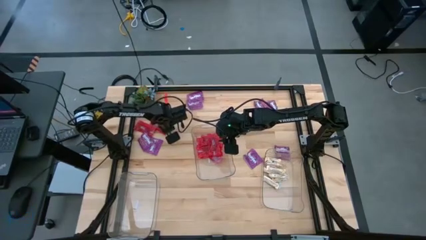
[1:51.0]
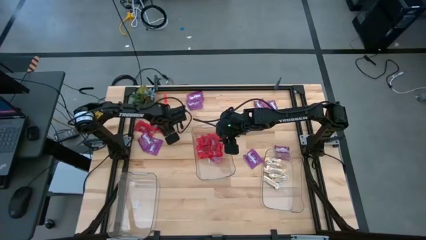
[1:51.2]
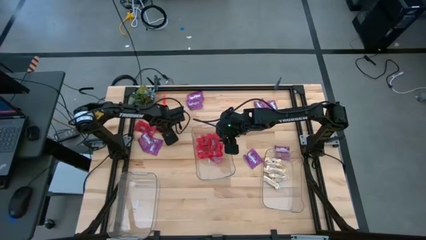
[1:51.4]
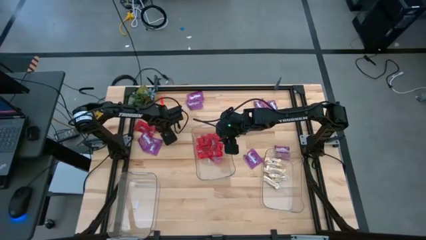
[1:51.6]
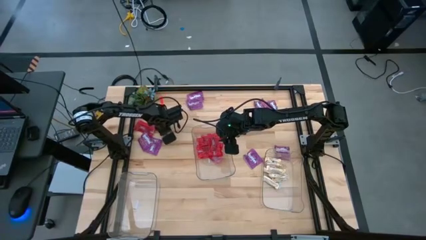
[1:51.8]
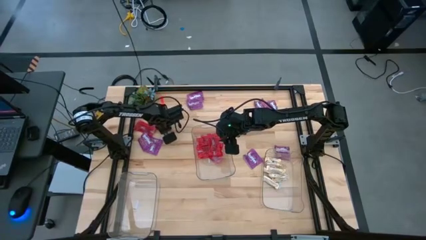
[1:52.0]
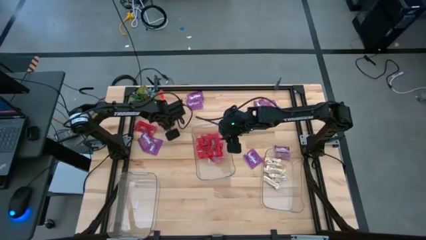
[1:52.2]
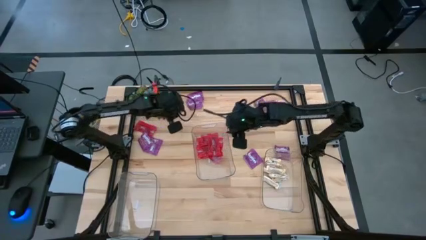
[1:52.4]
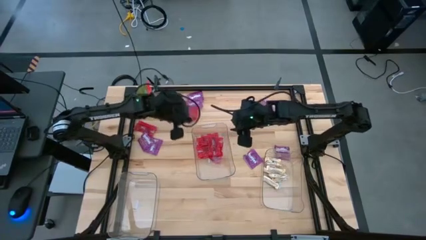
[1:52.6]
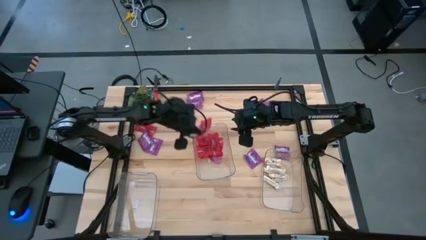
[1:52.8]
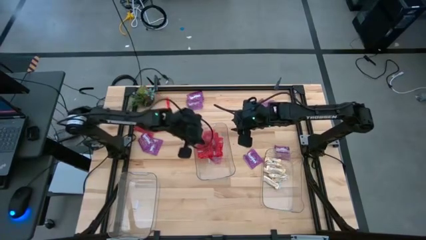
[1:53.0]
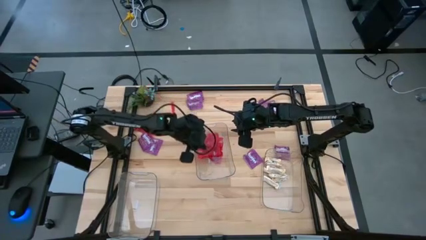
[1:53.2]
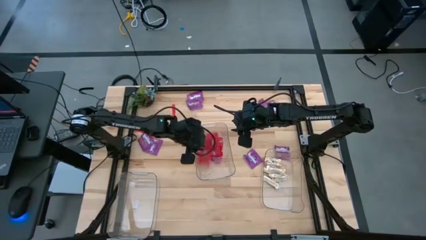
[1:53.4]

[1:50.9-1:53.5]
Task: Sort candy
Put the red candy pack into the middle transparent bin

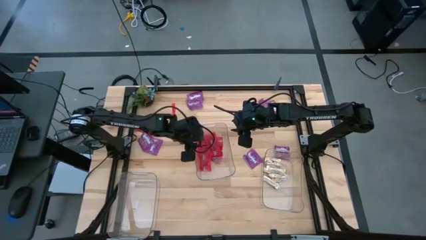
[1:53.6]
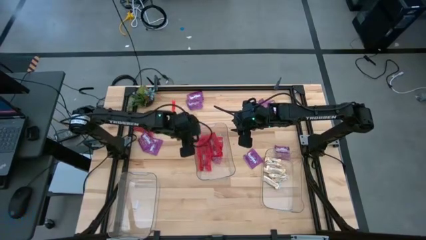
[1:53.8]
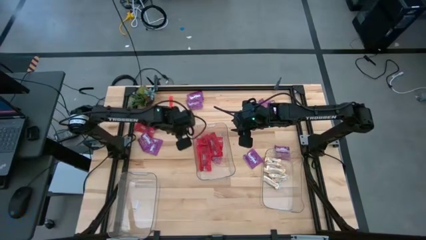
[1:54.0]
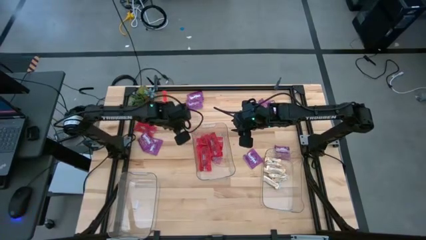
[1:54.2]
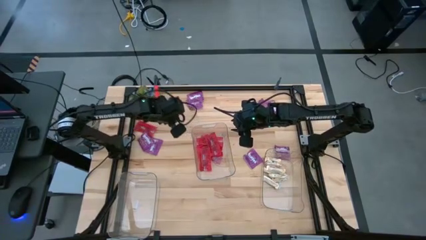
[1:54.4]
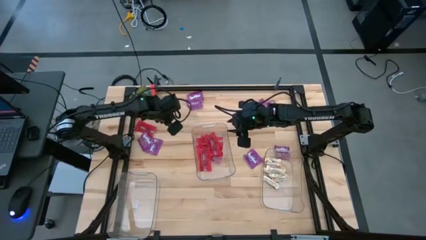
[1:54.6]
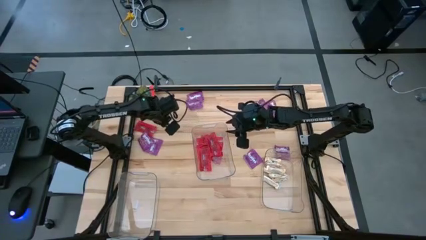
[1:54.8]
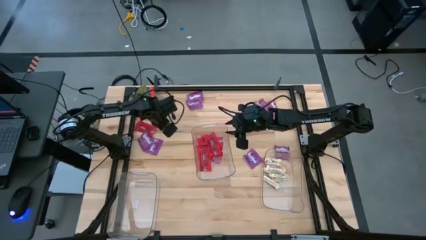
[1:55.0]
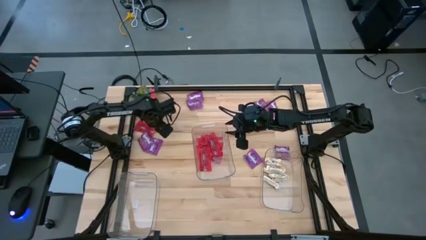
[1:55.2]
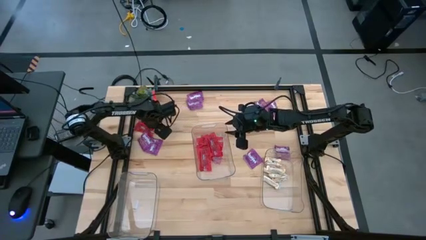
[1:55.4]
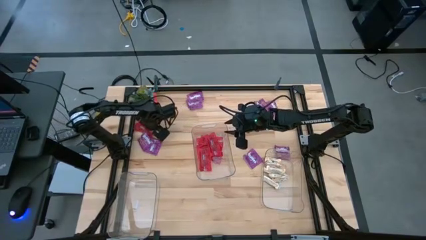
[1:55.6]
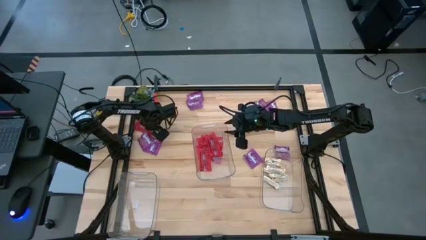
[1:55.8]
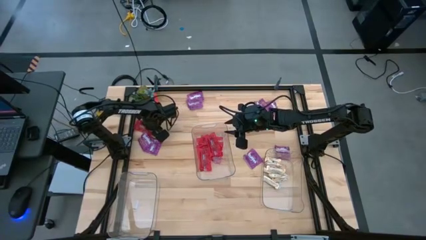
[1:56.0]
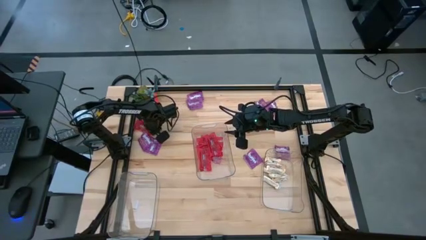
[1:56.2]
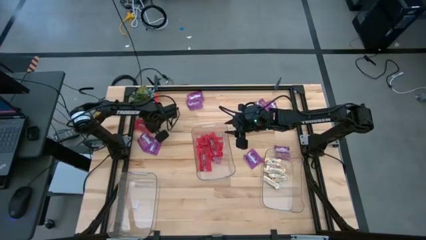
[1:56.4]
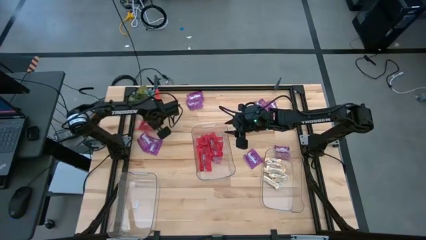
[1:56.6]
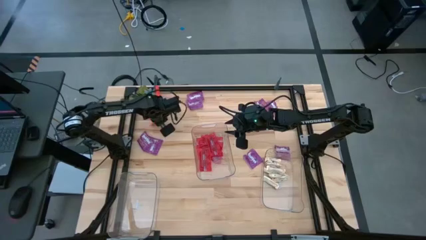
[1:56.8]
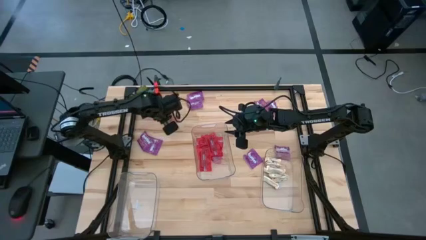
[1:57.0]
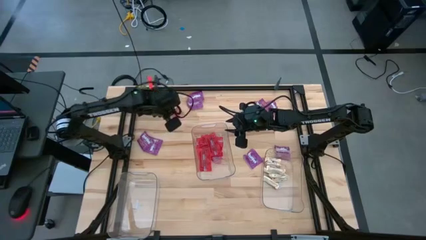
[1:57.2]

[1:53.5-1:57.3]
Put the red candy pack into the middle transparent bin

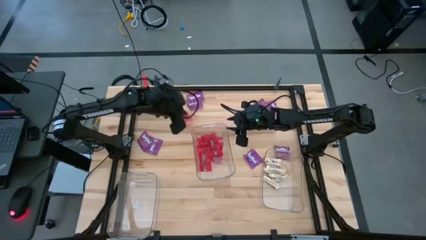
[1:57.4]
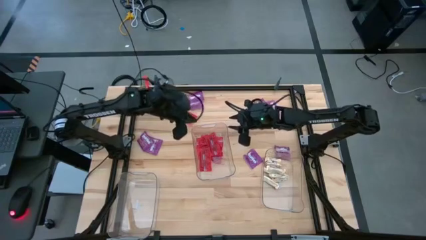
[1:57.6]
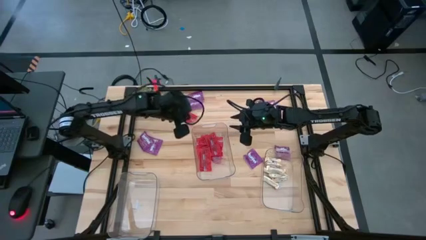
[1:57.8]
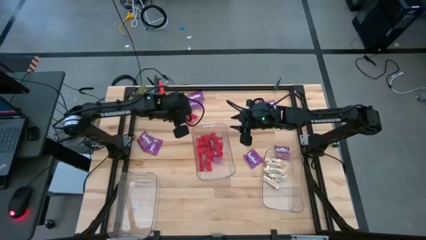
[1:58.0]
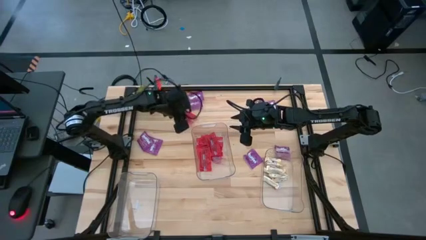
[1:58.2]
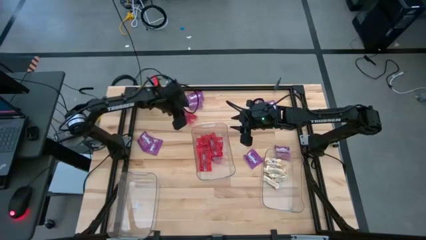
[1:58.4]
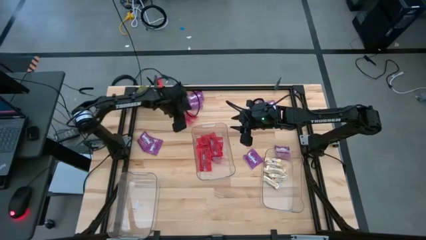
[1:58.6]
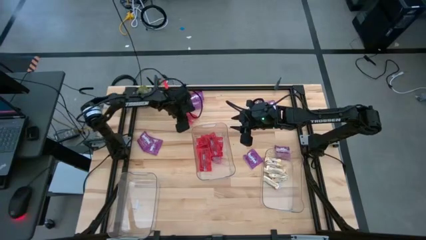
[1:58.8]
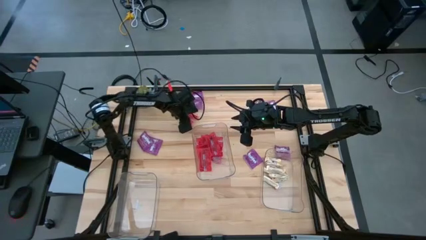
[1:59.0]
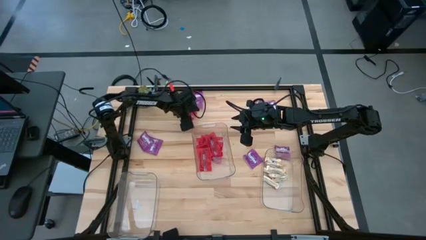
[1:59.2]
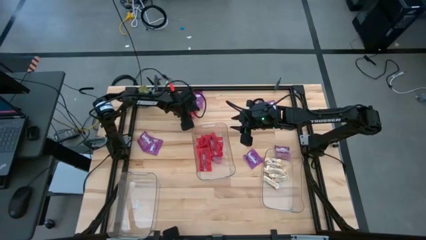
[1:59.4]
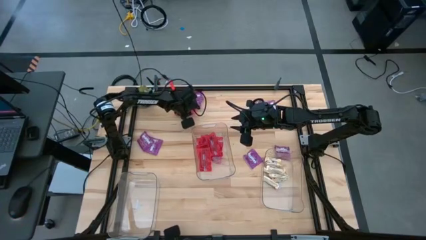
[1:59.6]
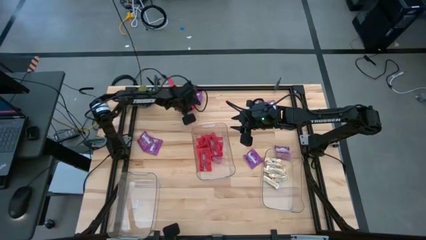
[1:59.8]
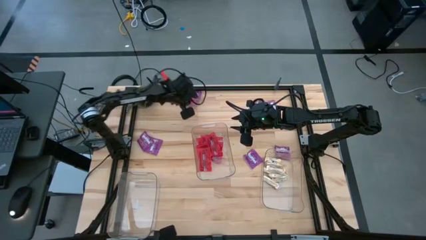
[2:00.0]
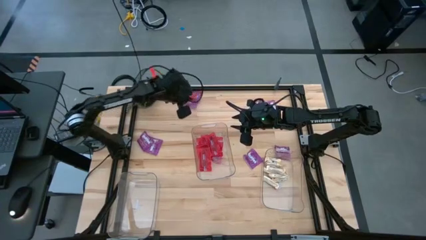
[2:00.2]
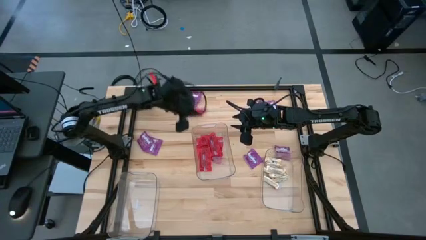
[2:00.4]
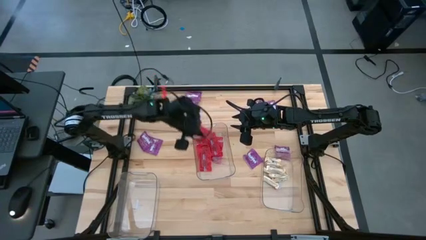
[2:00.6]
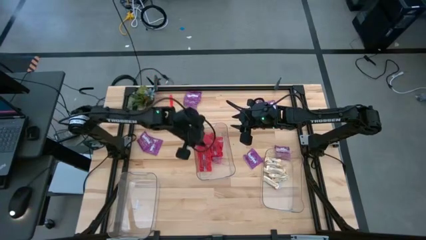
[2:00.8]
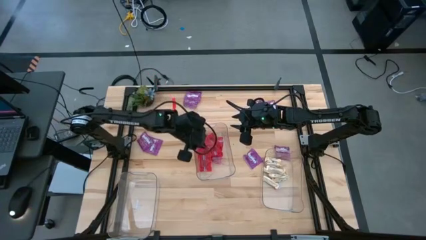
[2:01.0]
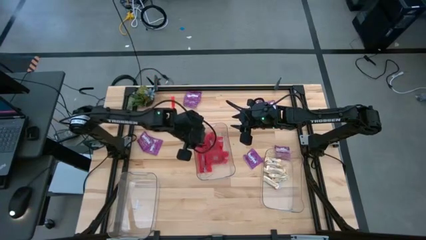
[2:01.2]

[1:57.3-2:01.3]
Put the red candy pack into the middle transparent bin

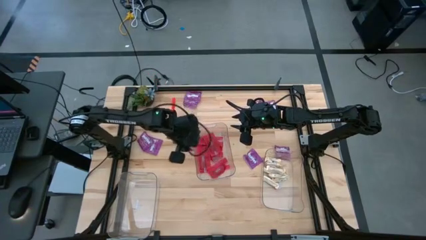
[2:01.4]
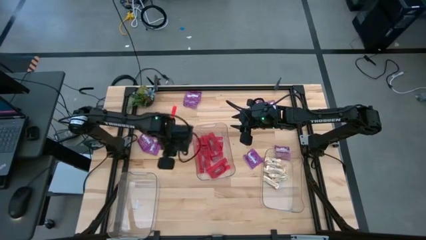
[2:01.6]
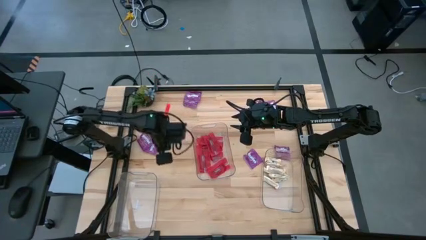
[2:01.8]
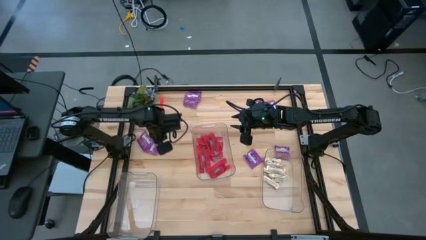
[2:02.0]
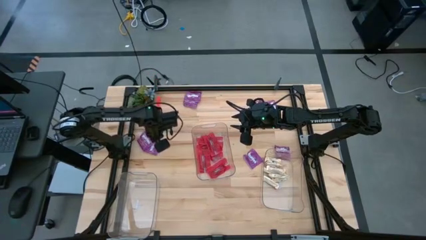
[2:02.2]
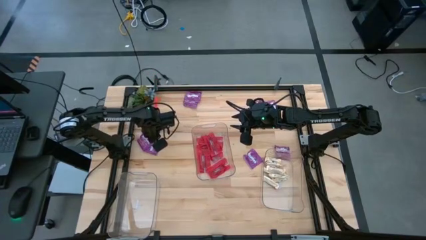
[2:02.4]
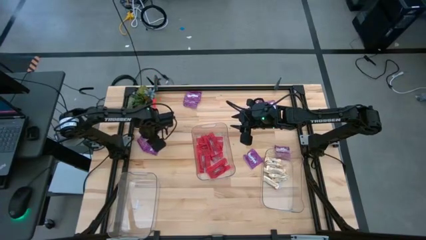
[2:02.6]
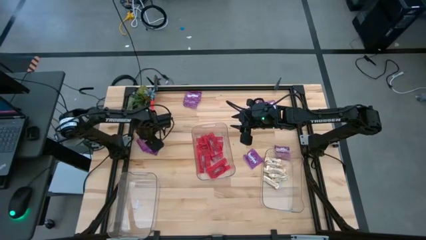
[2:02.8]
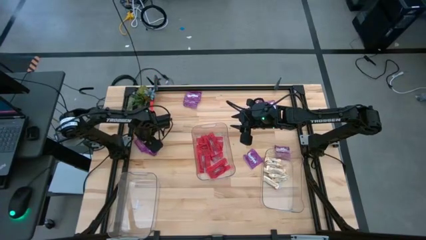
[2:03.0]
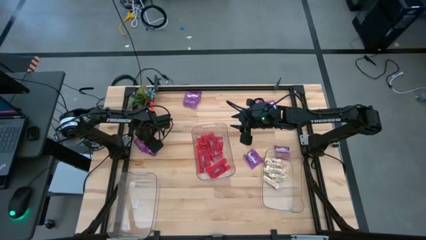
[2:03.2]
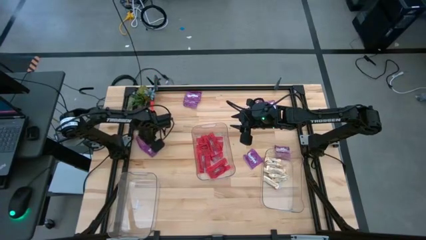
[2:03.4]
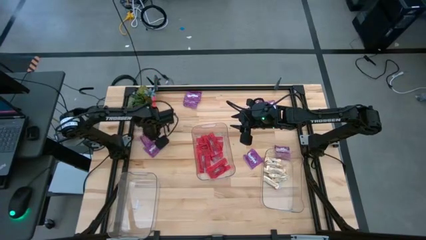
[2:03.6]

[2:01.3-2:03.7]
Put the violet candy pack into the left transparent bin

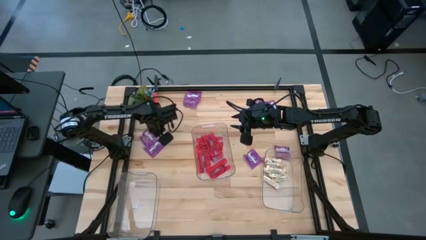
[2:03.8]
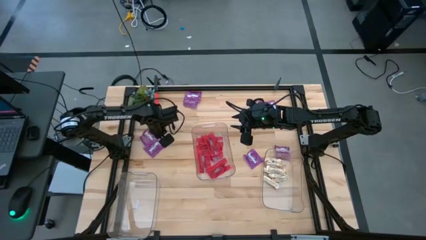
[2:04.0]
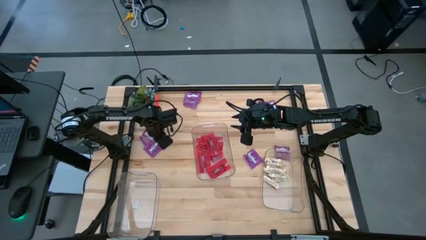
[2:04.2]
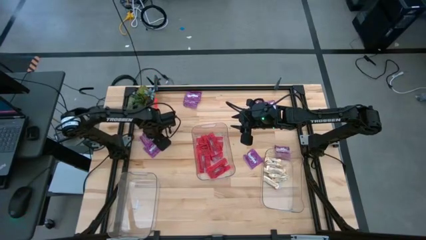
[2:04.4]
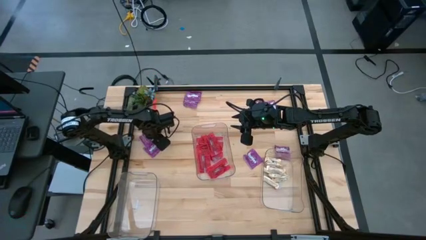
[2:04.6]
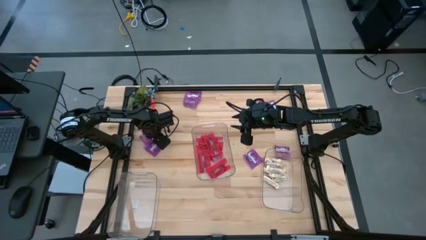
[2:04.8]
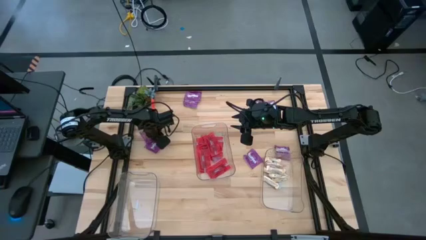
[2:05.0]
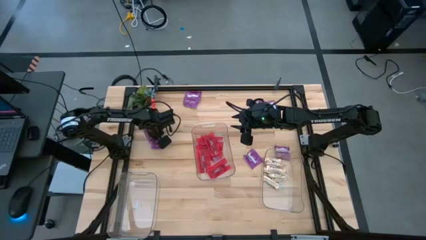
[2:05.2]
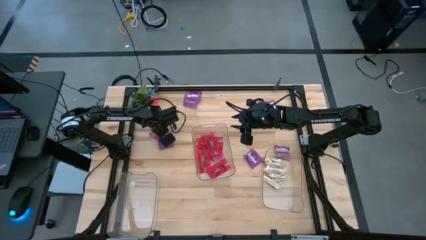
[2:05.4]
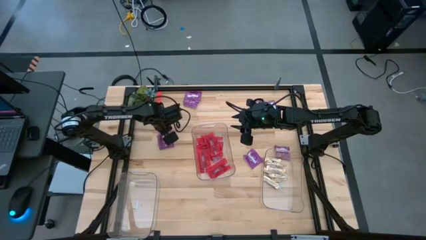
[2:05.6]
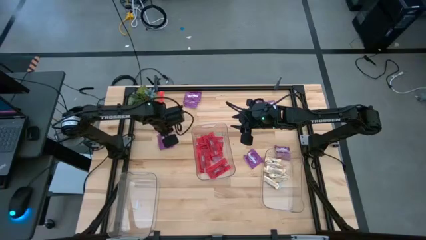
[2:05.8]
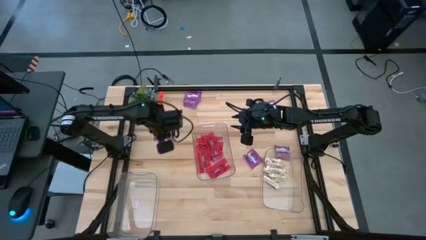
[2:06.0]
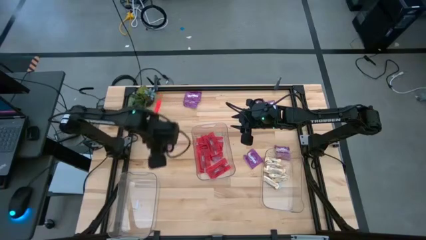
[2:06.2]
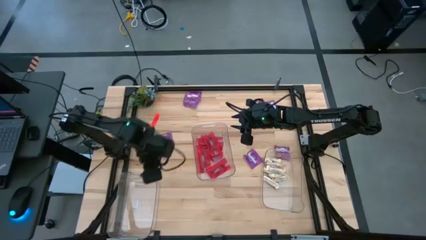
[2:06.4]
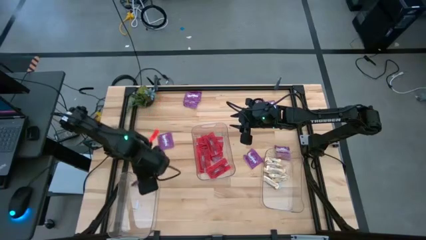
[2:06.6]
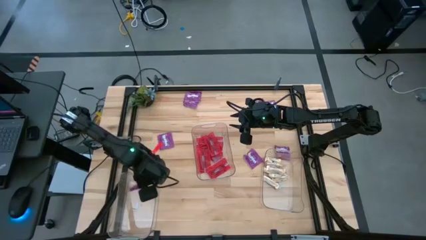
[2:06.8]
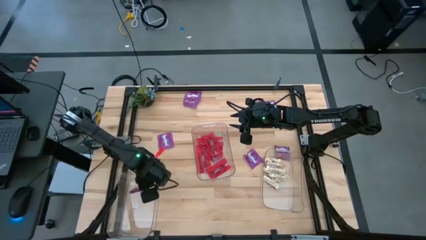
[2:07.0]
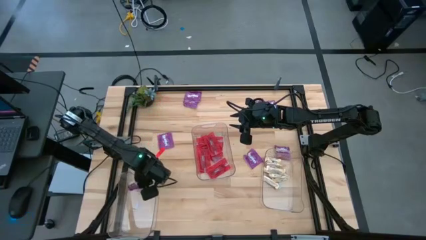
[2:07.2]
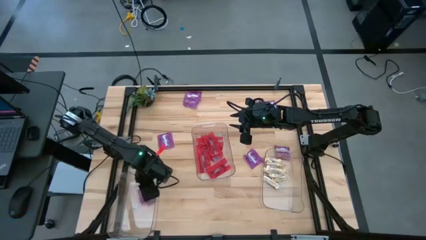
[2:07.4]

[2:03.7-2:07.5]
Put the violet candy pack into the left transparent bin

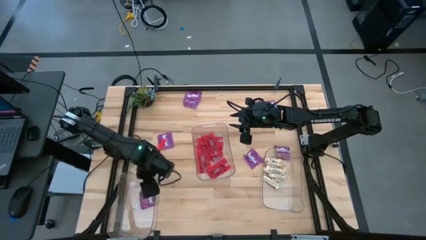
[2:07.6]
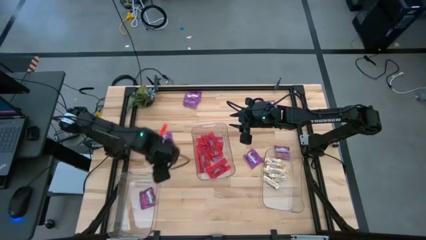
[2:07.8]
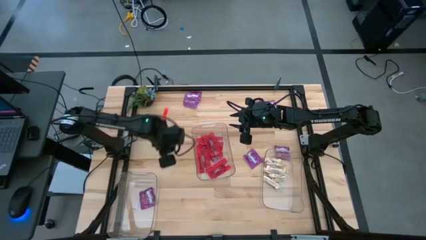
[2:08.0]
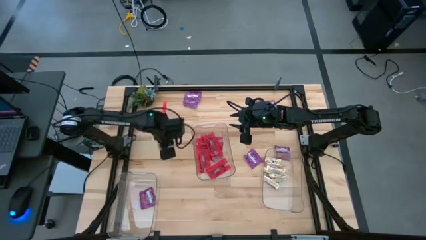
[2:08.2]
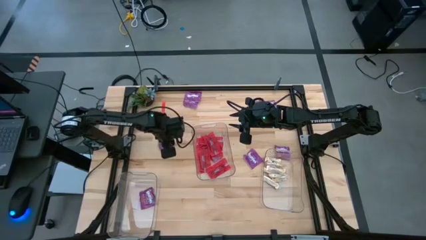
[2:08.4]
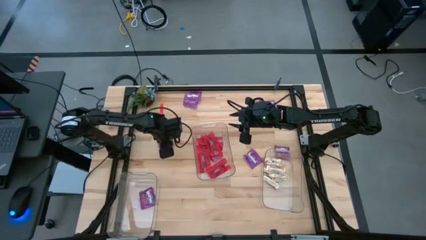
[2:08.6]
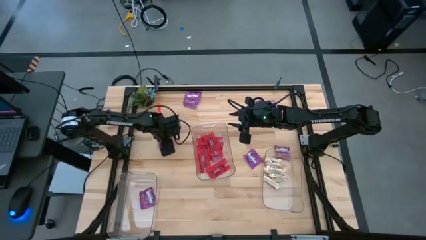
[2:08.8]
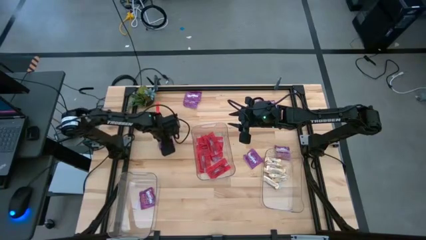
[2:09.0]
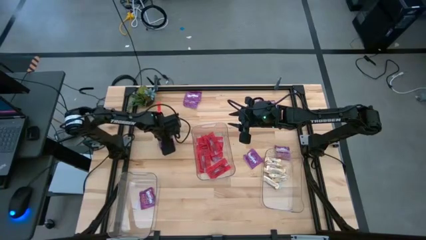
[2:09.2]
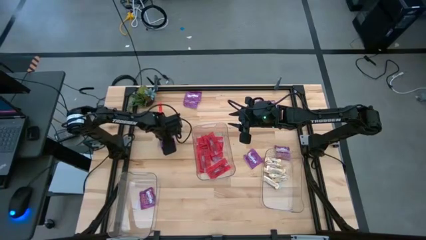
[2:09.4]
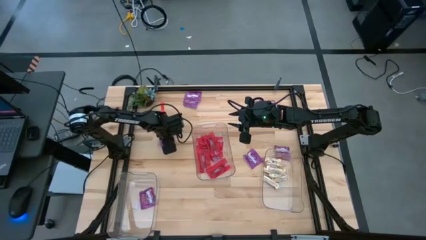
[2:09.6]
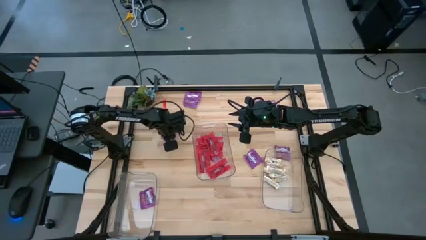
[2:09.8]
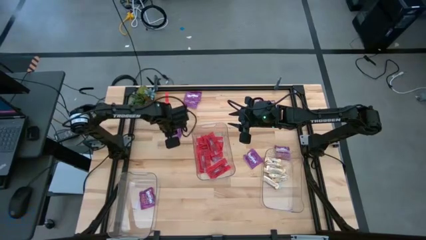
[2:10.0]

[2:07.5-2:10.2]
Put the violet candy pack into the left transparent bin
